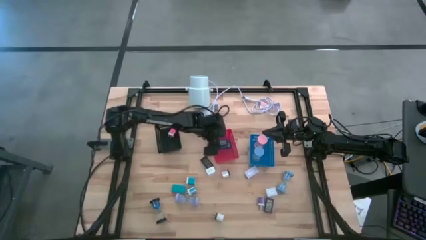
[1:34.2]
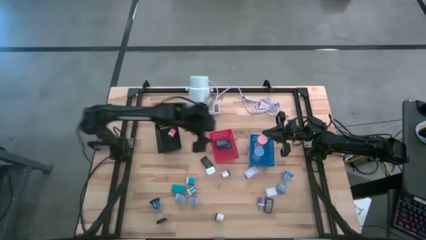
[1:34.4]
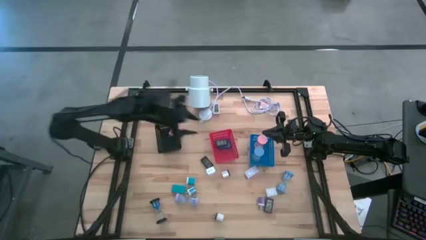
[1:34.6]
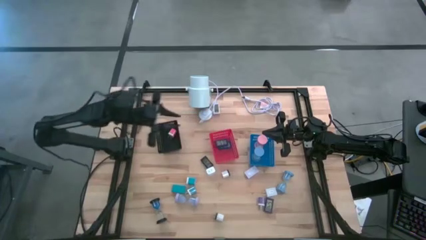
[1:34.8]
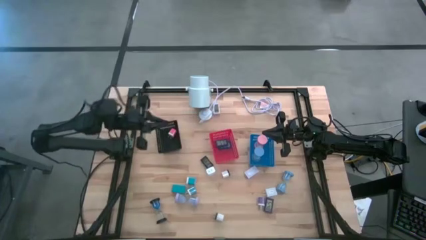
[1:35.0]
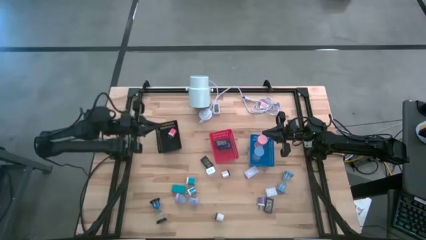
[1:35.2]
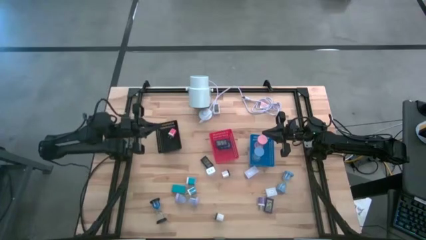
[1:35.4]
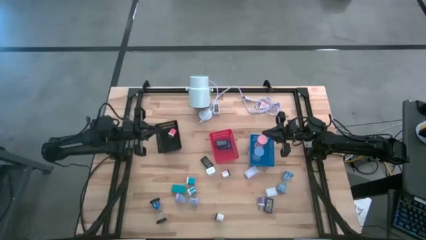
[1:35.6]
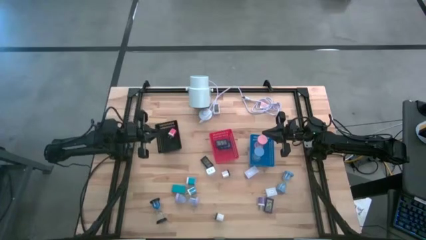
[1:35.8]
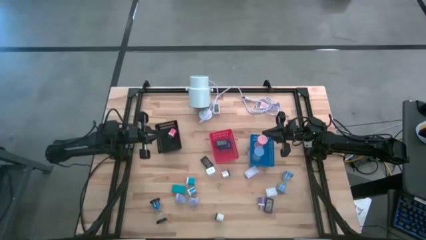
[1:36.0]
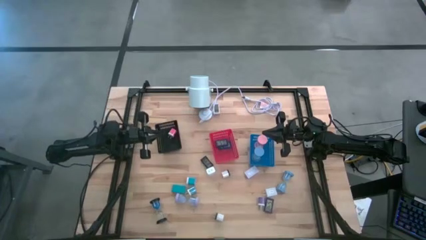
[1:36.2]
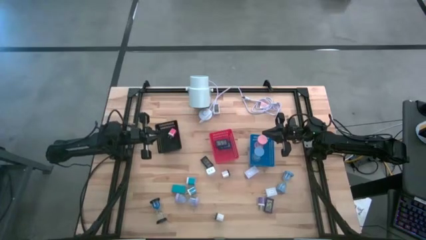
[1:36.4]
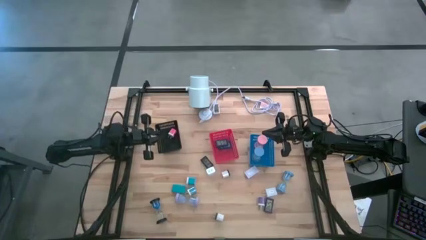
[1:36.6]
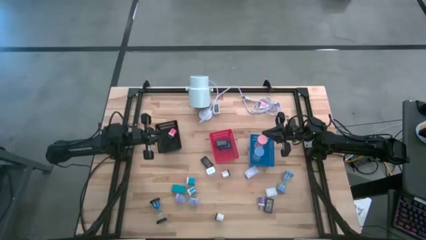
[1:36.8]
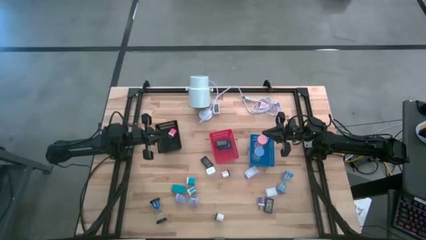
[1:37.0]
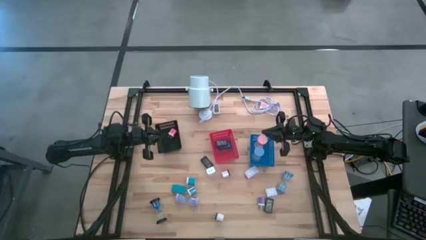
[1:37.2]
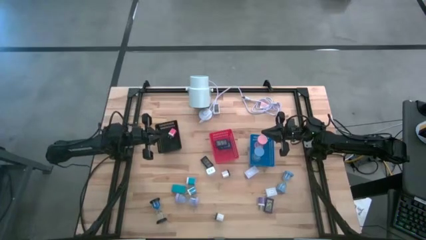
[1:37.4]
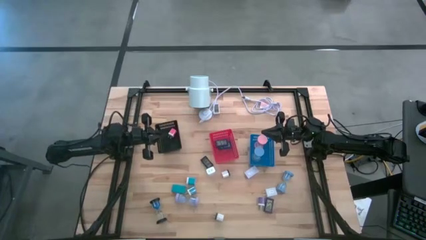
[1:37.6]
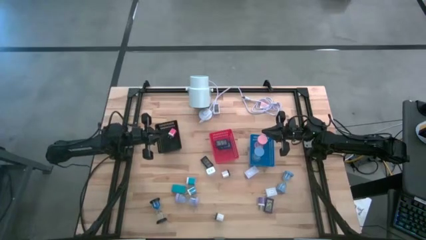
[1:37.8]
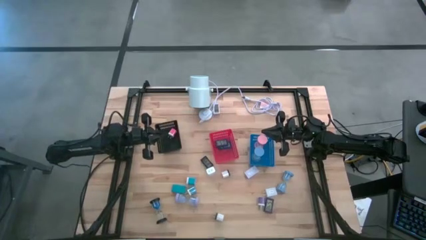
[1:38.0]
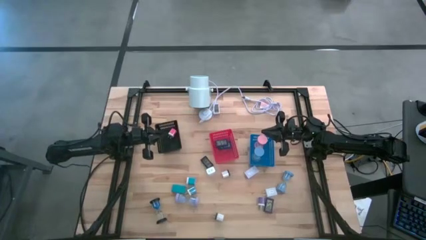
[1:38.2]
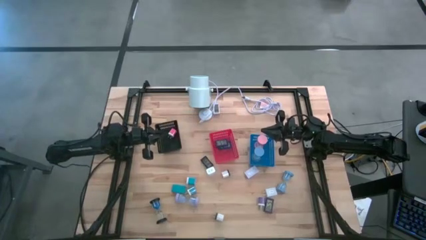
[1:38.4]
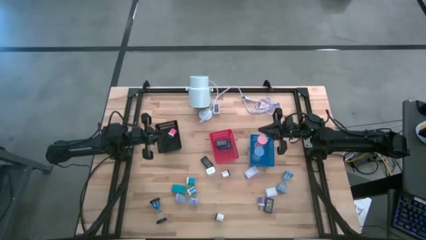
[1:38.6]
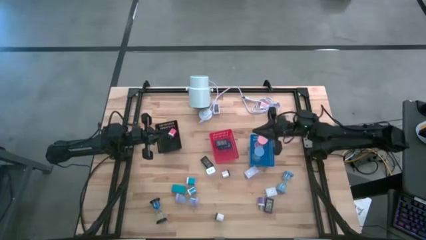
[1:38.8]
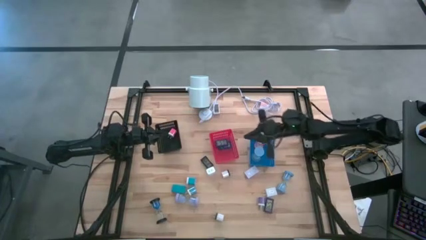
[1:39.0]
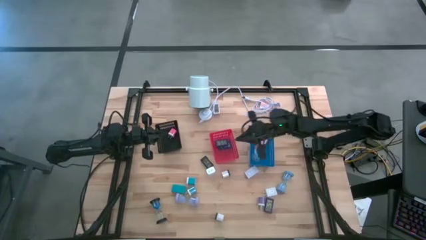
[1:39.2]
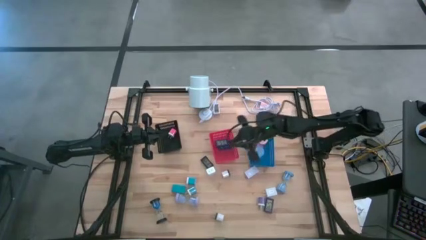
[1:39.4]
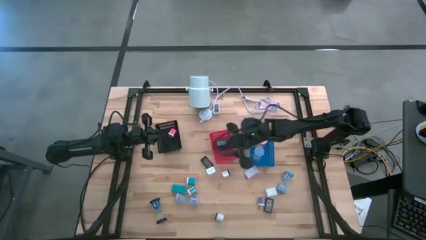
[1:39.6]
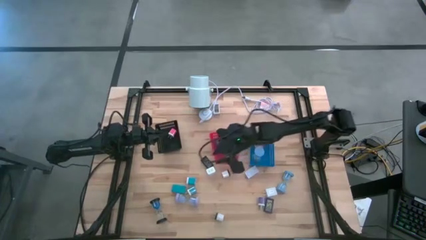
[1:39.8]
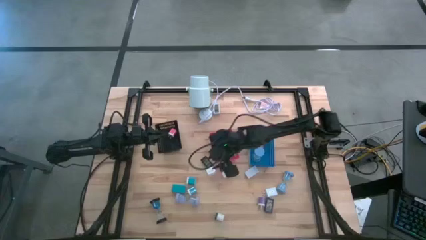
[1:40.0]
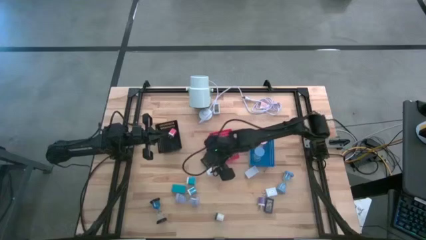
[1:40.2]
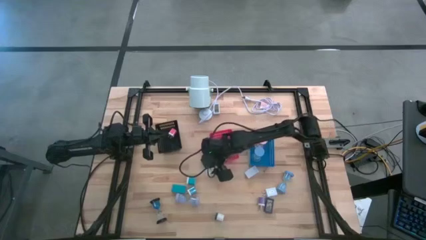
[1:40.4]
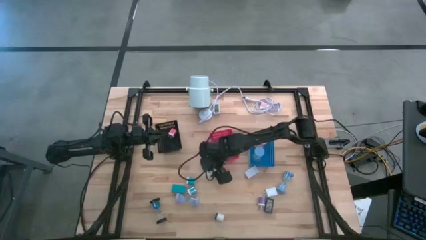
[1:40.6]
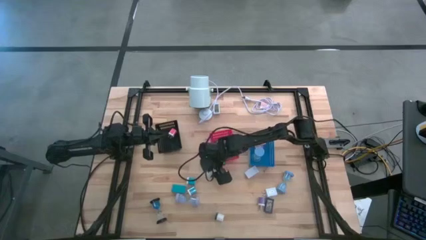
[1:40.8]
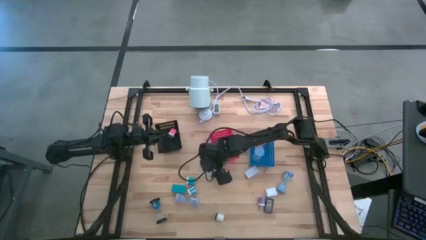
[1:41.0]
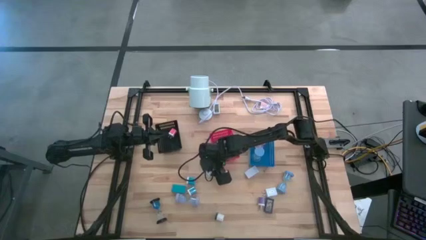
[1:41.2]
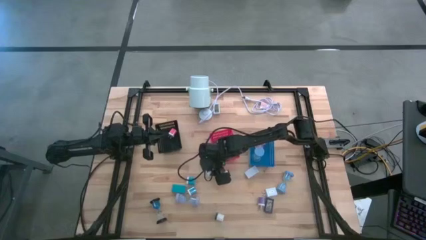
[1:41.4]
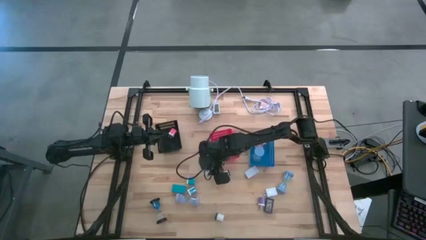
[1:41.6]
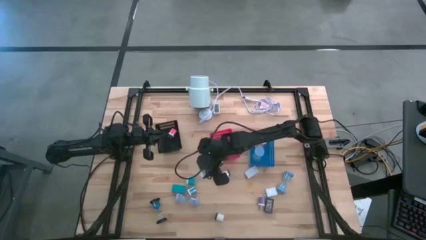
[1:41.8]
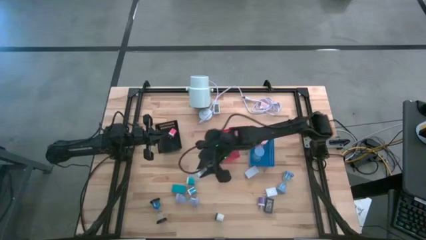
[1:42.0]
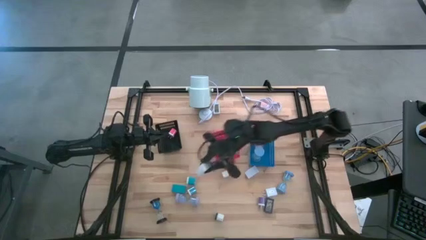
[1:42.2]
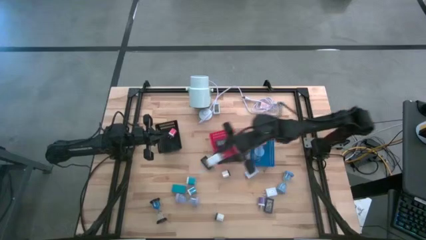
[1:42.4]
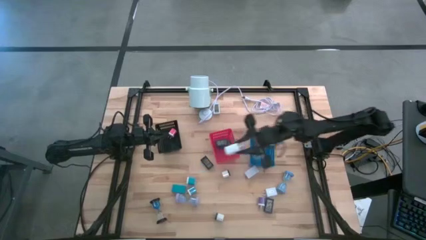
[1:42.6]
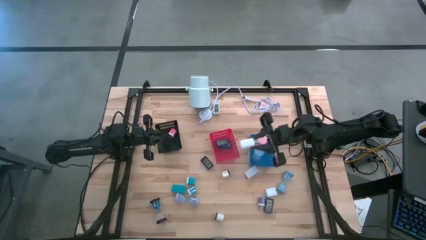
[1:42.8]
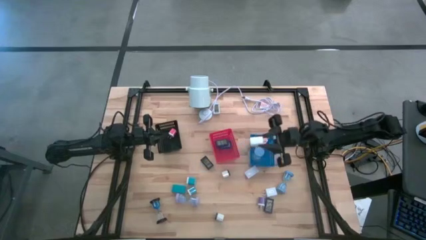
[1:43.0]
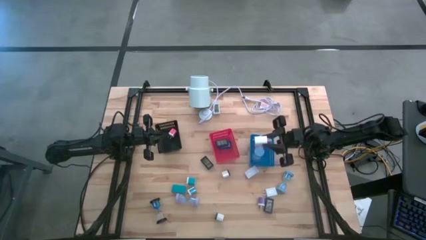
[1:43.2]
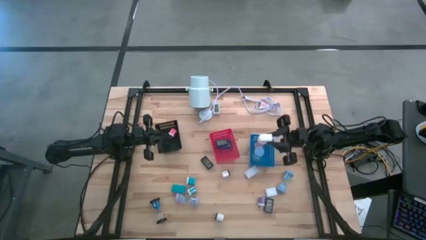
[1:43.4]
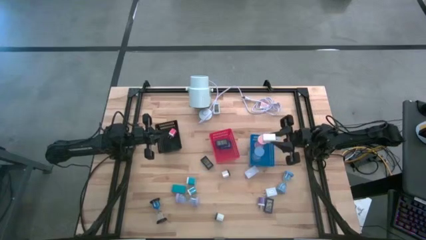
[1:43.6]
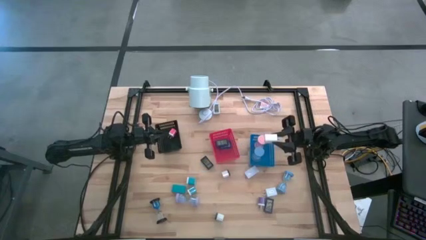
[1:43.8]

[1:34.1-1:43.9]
Task: Pick & Place Office items
Put the white charger adapter into the black bin

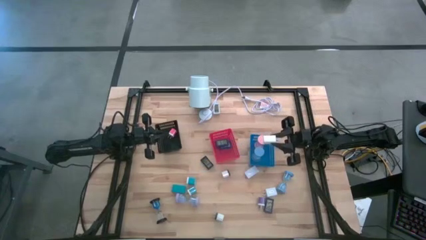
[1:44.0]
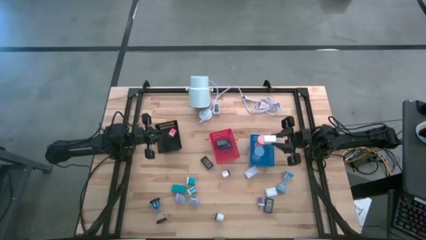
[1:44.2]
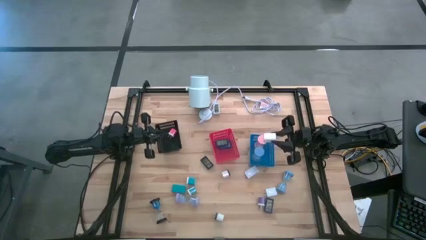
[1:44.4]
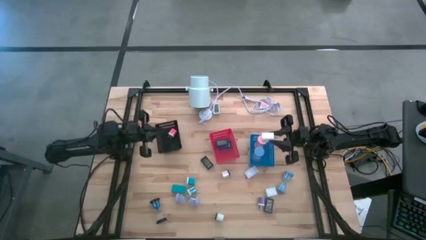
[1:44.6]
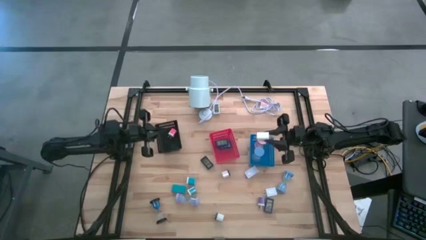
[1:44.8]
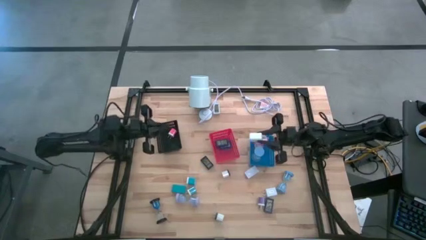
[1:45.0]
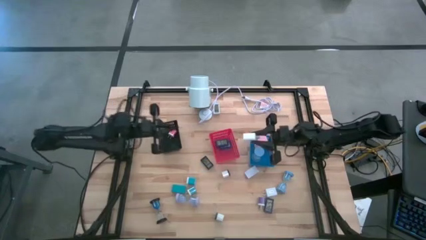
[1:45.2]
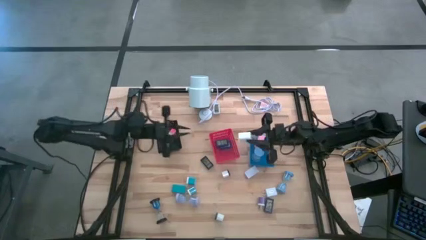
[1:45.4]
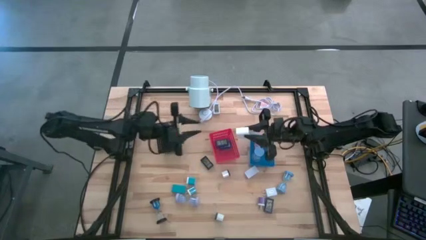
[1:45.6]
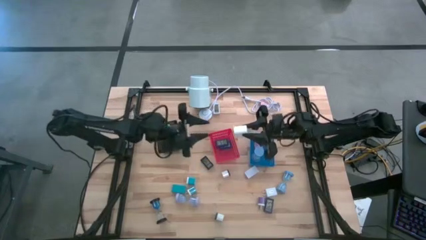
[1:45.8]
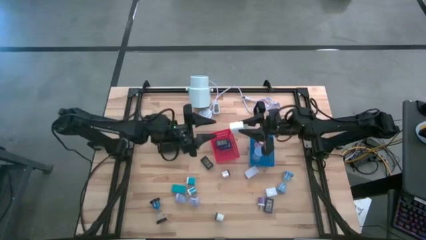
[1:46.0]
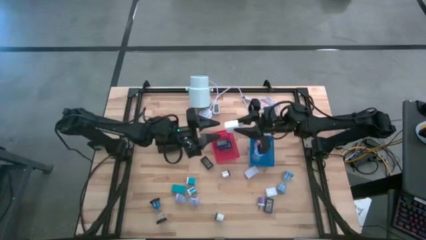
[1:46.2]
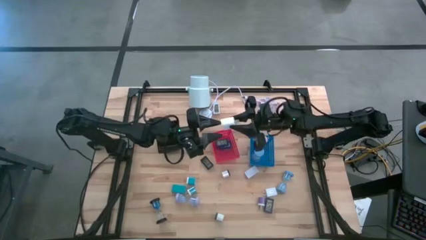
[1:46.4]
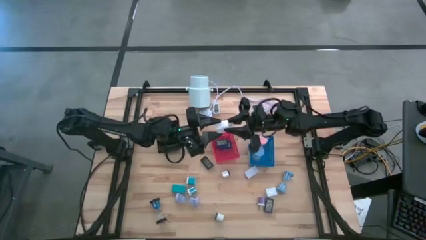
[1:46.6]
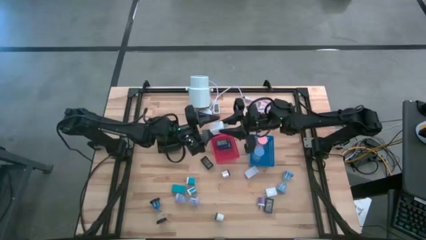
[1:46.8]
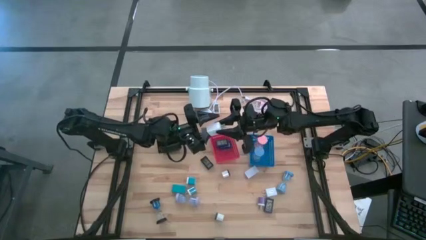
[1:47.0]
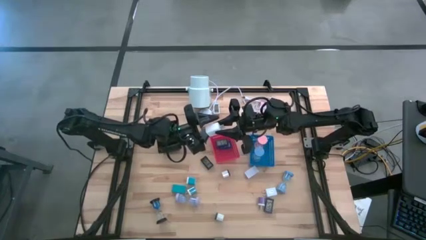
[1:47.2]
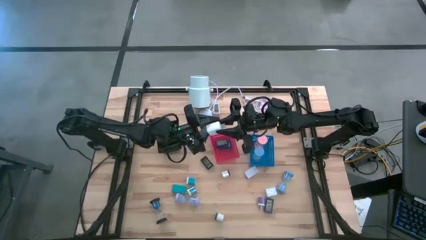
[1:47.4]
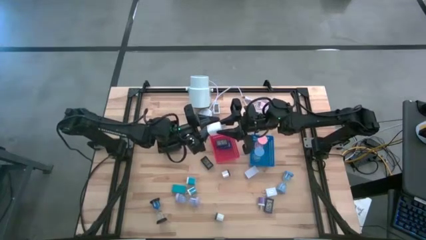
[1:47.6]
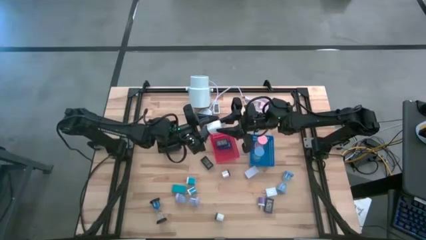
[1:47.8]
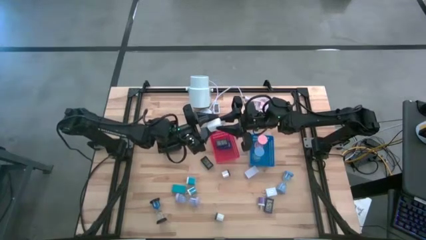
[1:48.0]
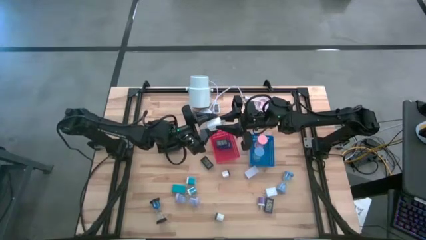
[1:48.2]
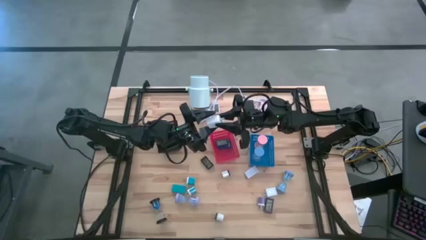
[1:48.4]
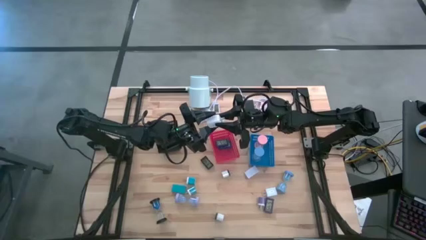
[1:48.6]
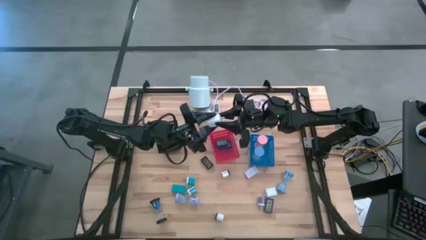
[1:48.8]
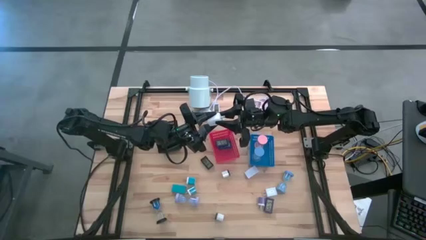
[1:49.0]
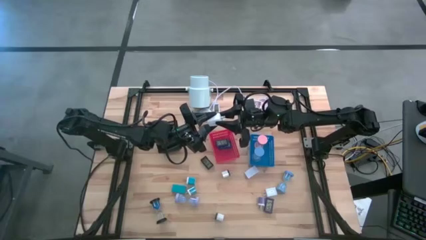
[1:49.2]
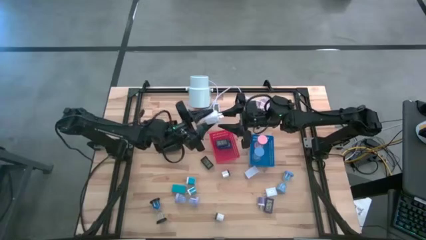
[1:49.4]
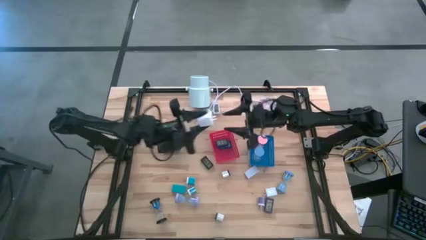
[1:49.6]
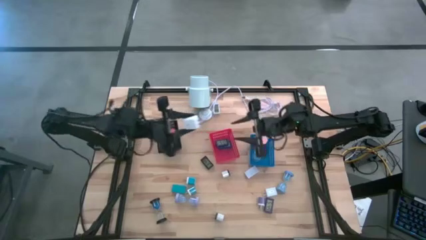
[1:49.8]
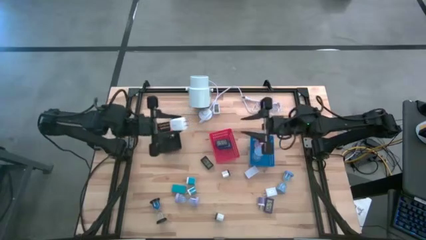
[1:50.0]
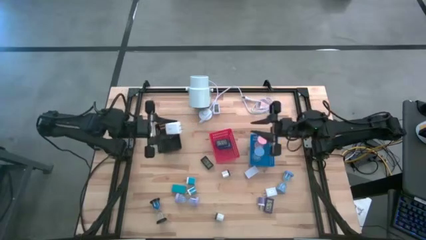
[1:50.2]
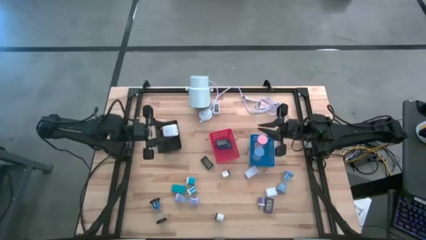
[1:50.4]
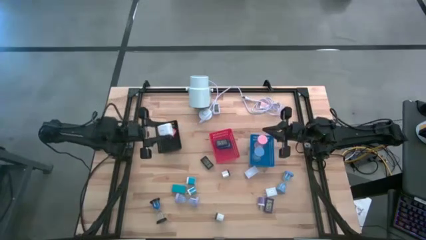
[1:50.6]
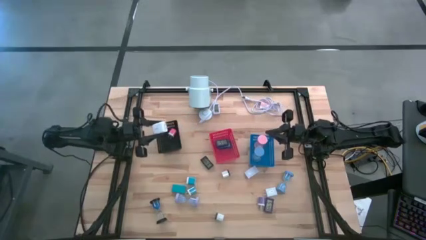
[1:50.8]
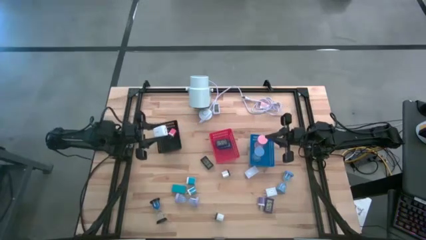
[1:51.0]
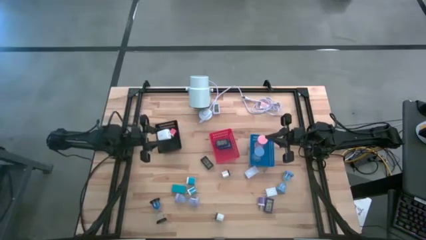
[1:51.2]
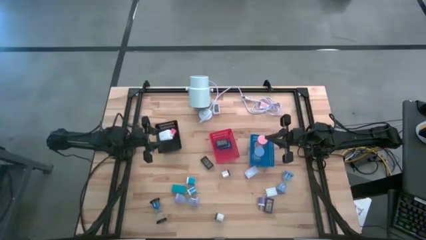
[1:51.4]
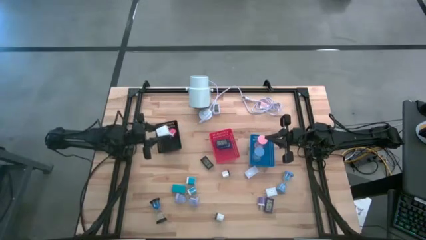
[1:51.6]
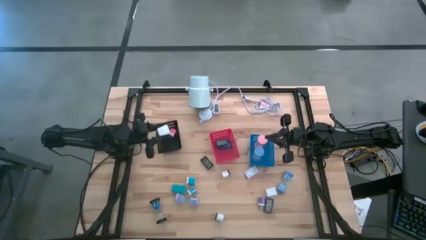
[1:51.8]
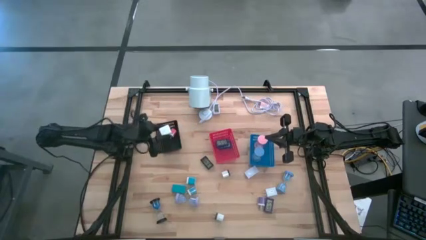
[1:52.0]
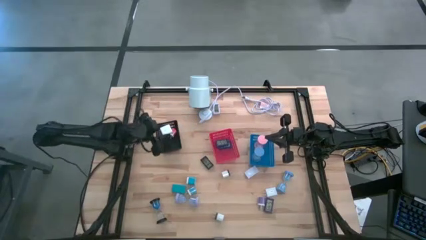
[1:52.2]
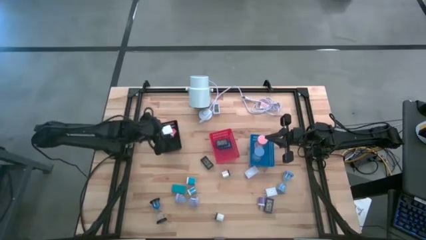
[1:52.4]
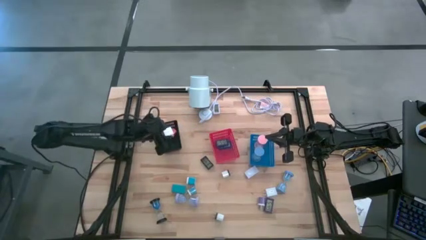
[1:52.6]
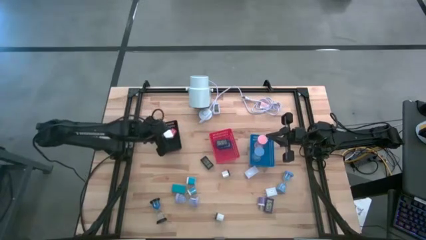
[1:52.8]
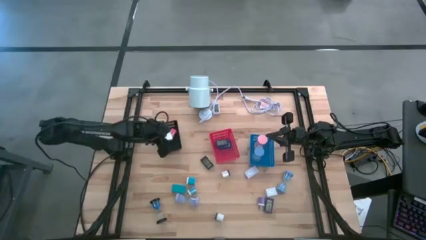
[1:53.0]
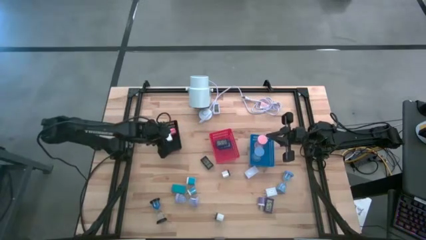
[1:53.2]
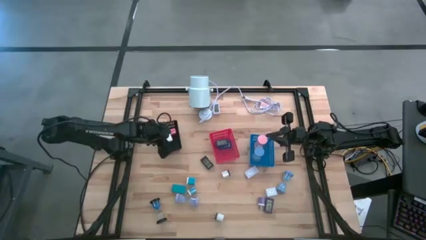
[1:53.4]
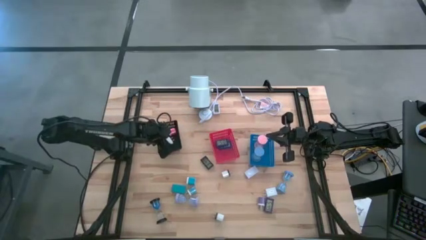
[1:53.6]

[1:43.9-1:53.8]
Put the white charger adapter into the black bin
